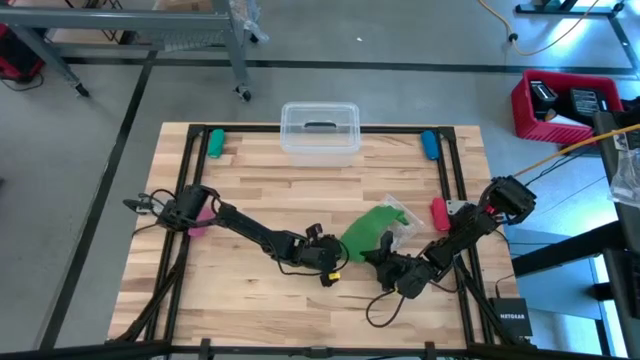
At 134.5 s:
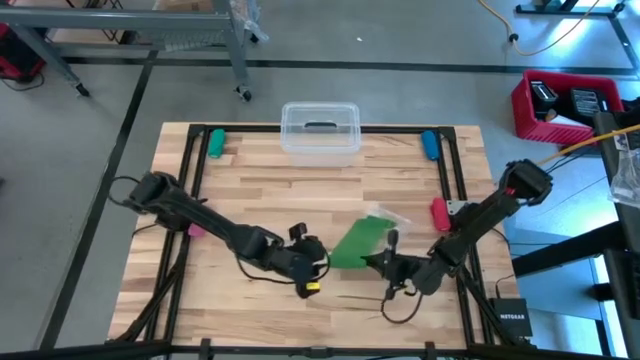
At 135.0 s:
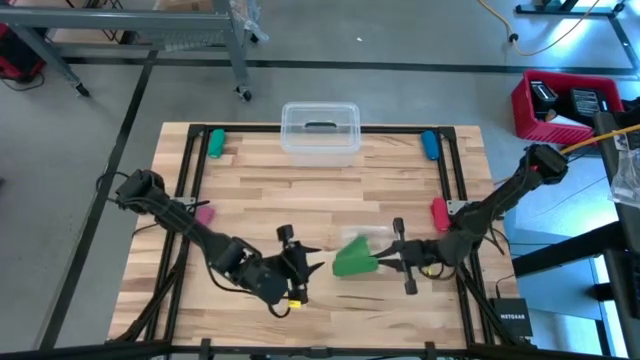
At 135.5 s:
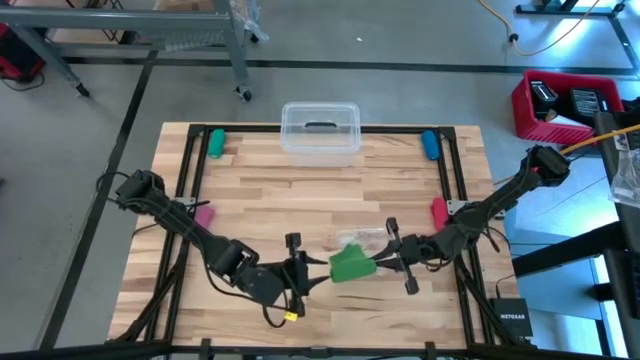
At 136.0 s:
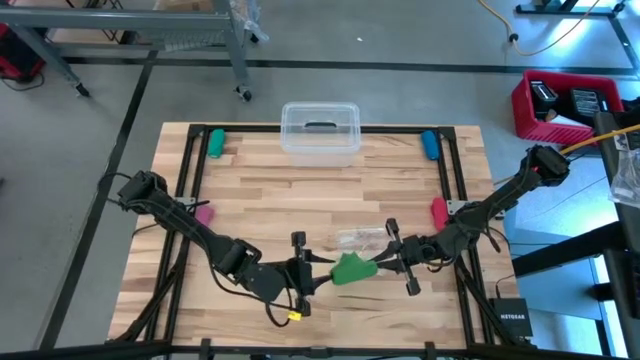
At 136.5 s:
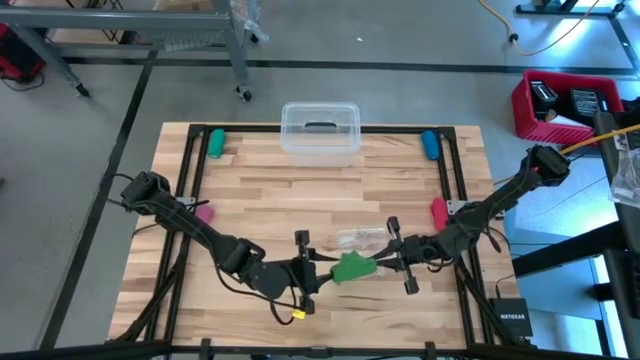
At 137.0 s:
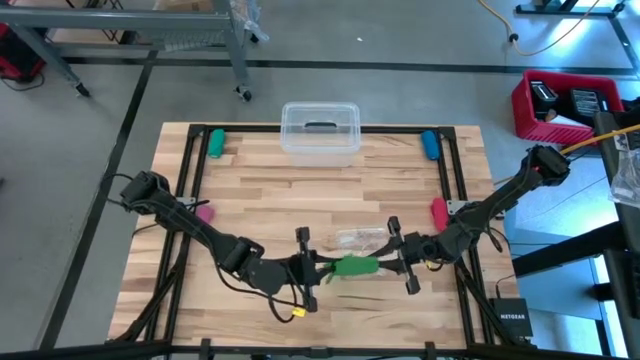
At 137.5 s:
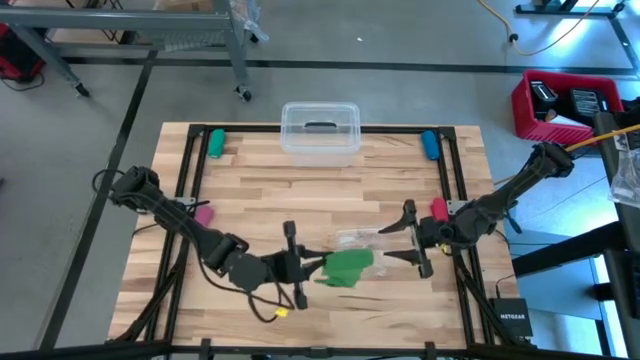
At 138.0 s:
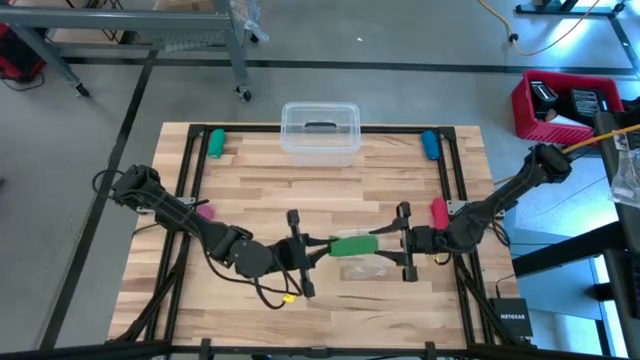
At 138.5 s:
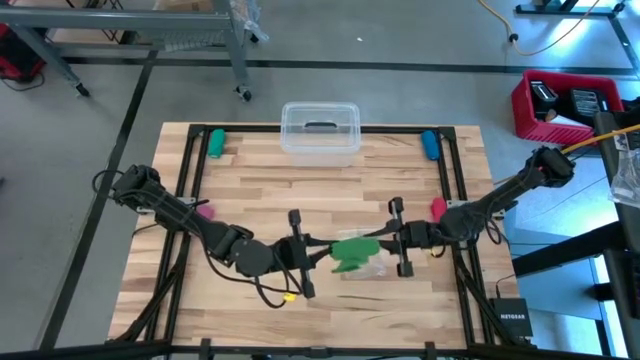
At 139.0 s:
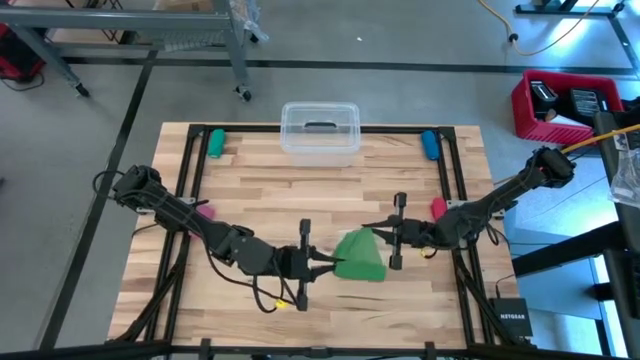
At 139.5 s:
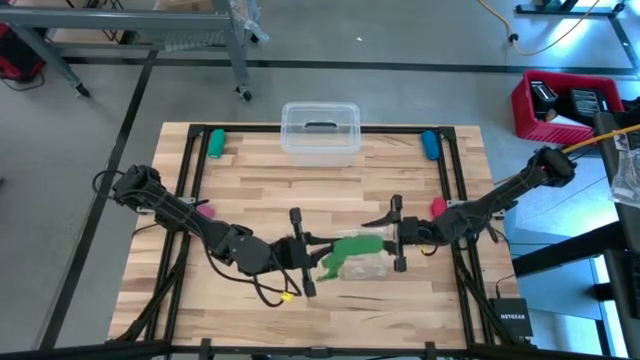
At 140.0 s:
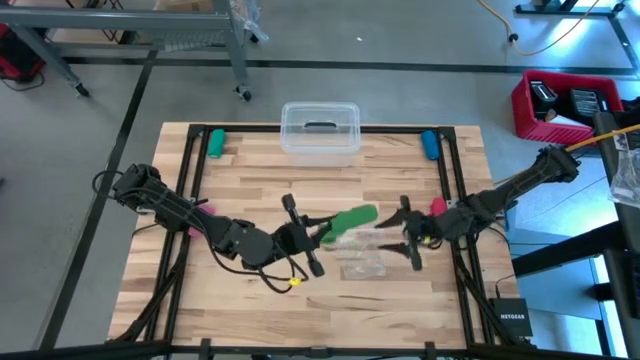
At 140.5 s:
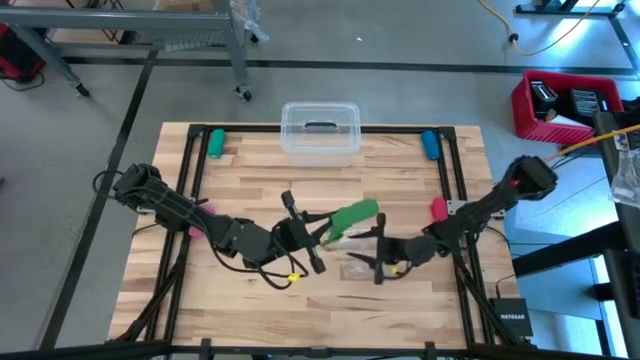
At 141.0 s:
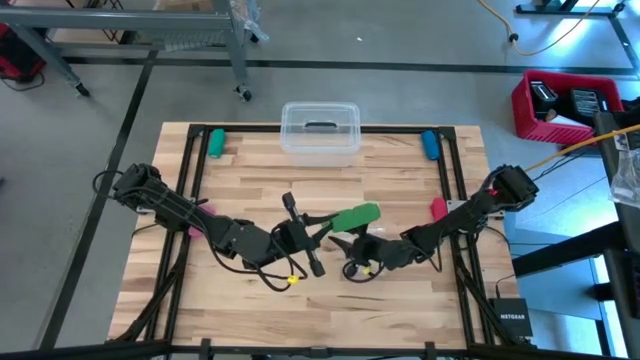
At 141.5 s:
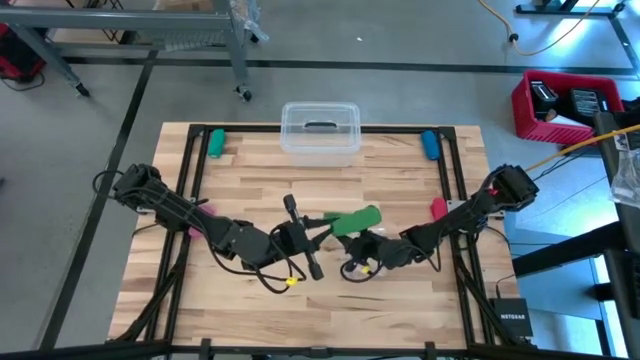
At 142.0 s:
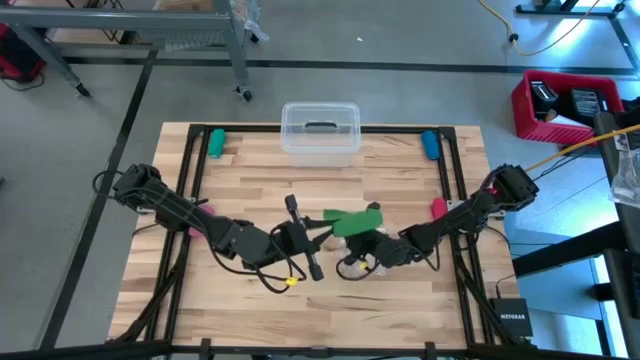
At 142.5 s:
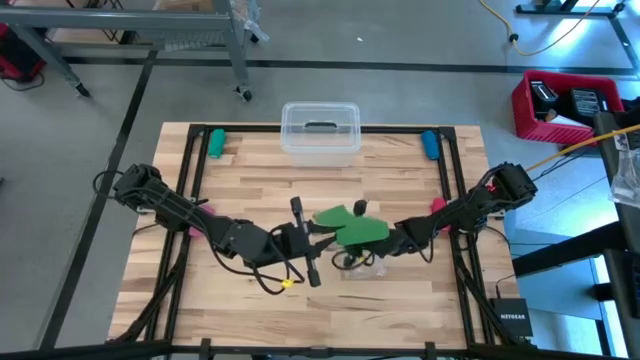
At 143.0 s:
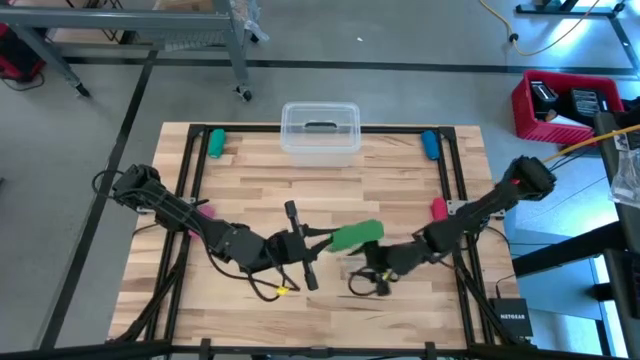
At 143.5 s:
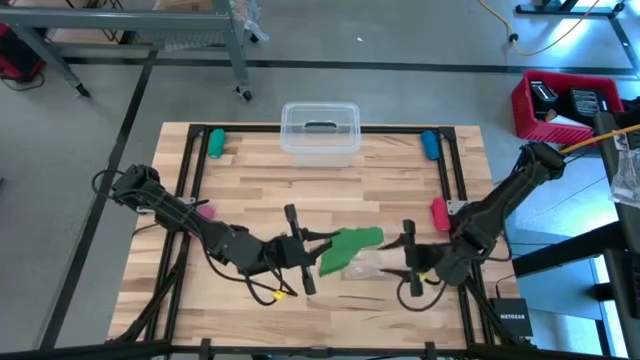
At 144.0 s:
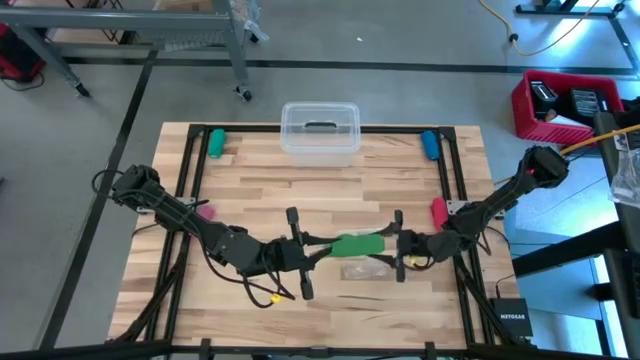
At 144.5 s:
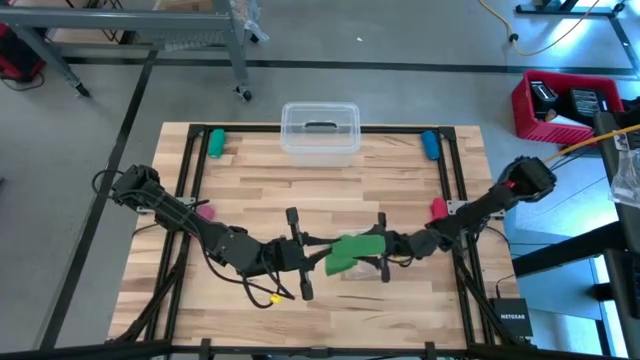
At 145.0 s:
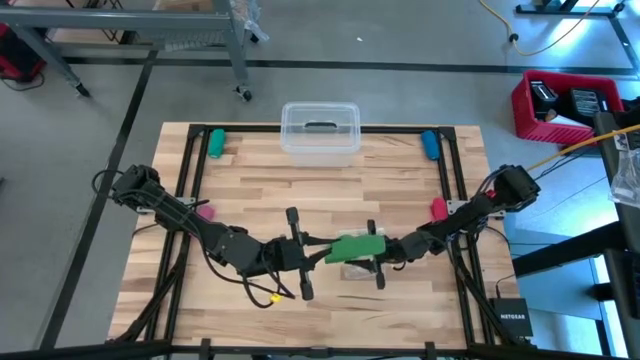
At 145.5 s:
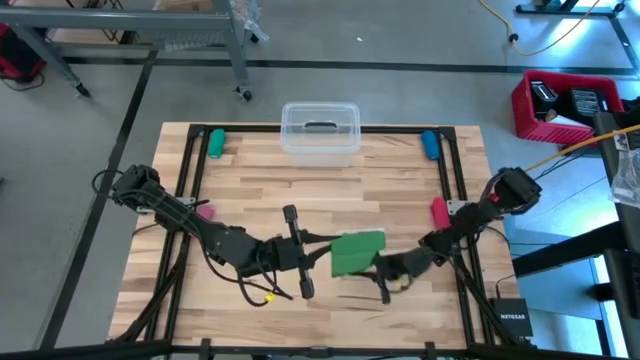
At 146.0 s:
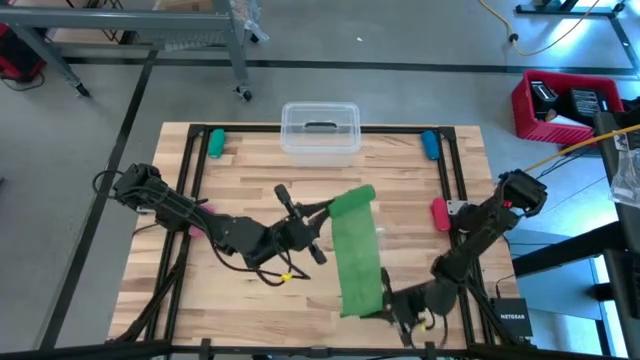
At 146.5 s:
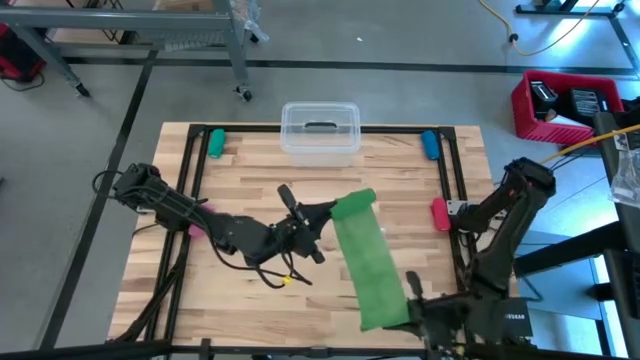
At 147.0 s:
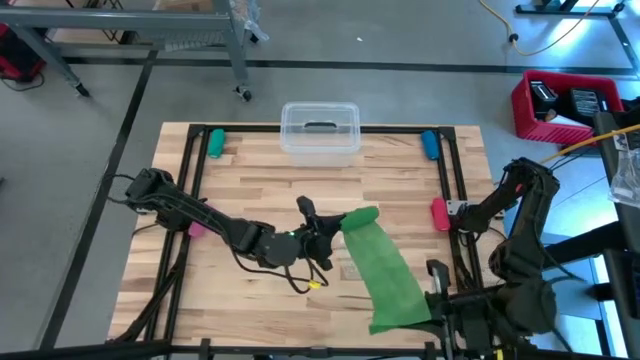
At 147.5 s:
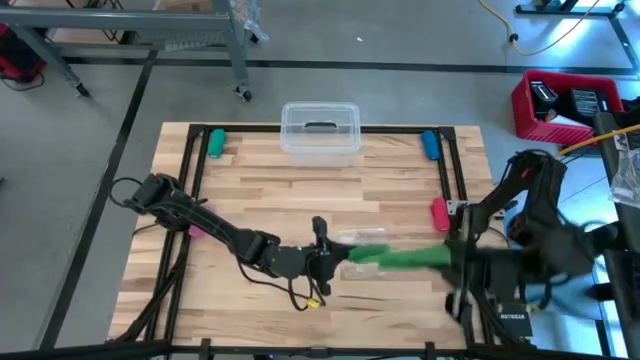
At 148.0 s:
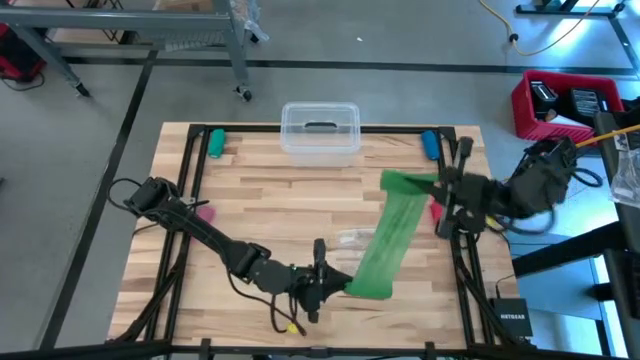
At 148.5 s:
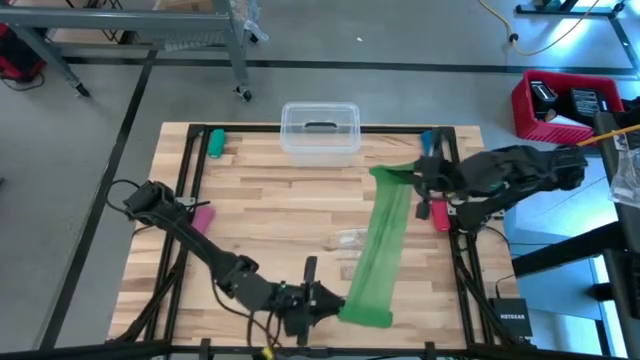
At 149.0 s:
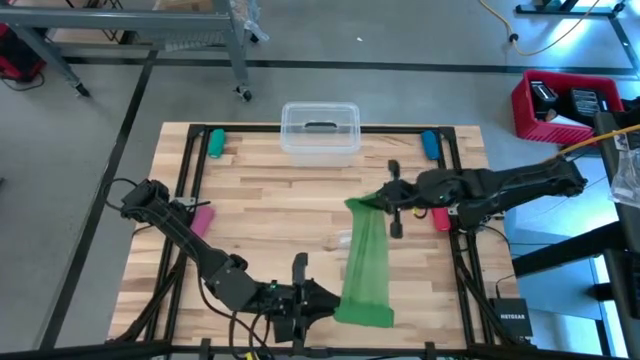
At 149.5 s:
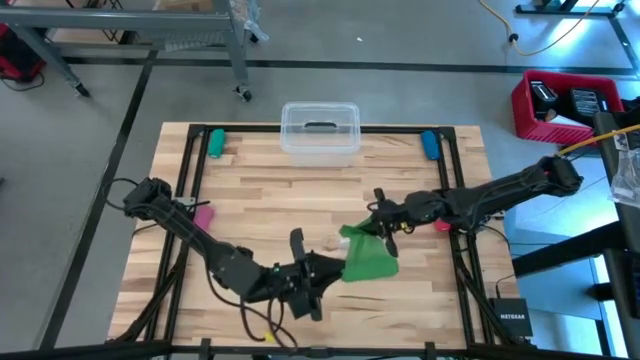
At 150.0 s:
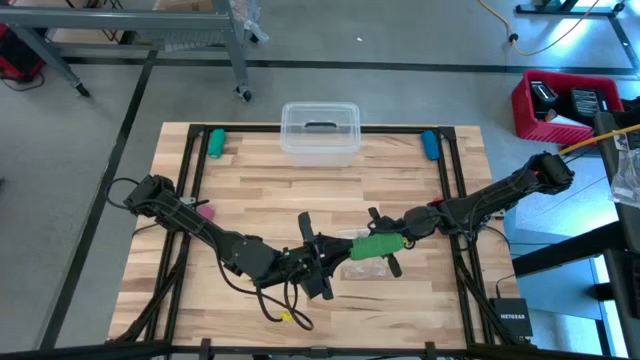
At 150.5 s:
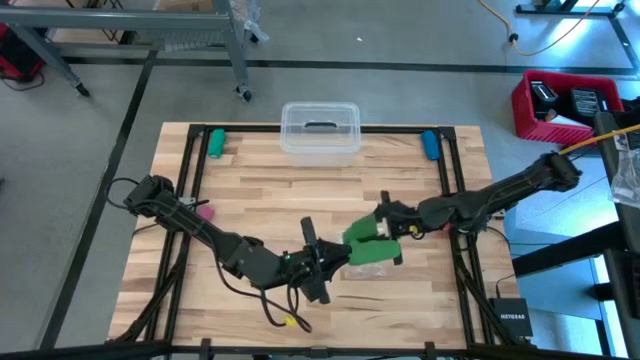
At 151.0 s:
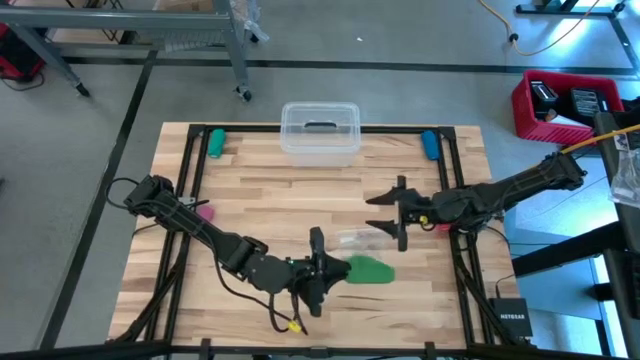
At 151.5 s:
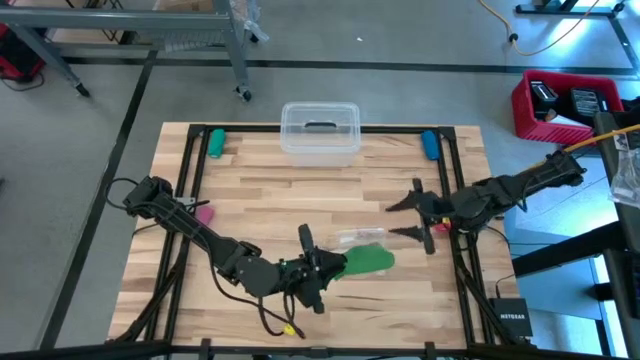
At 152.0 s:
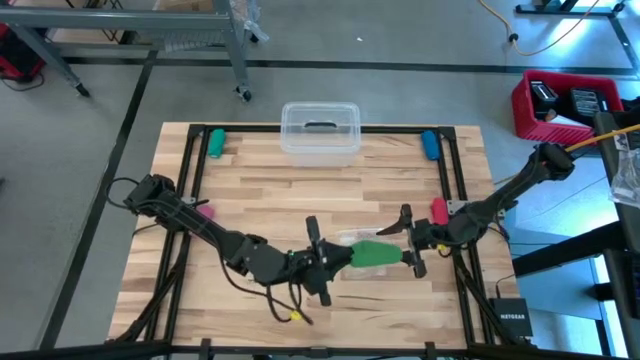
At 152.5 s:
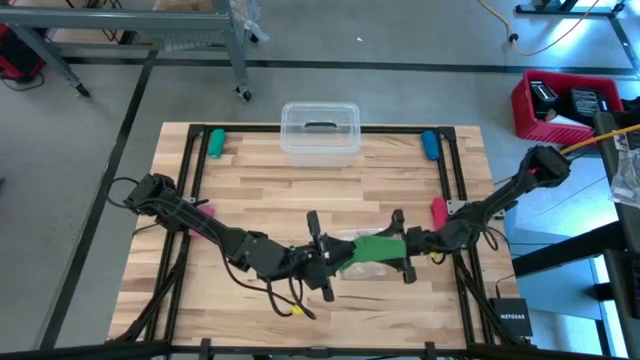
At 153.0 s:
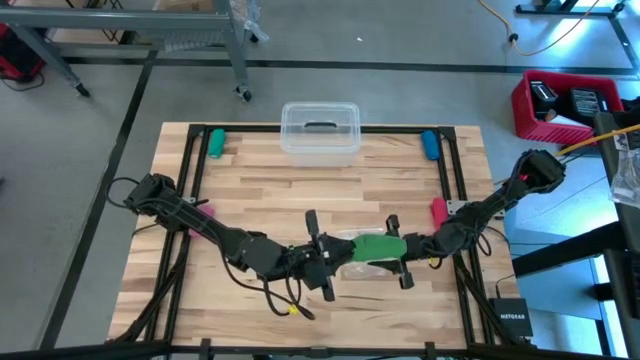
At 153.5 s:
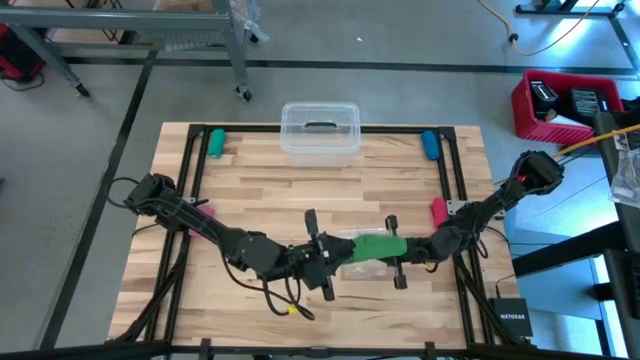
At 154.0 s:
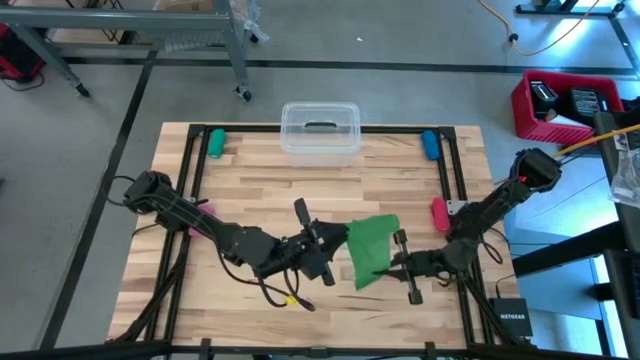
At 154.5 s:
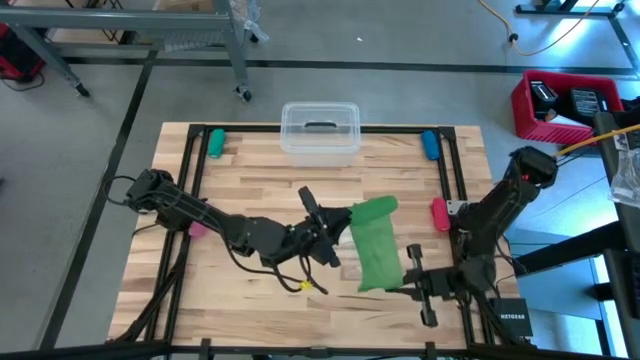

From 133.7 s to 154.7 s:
Task: Roll bandage
Roll the green bandage
